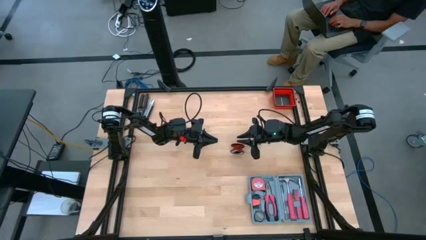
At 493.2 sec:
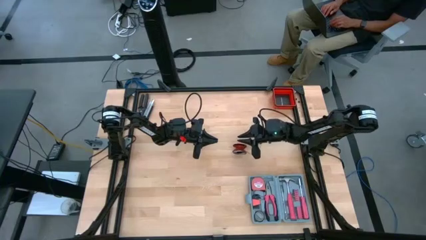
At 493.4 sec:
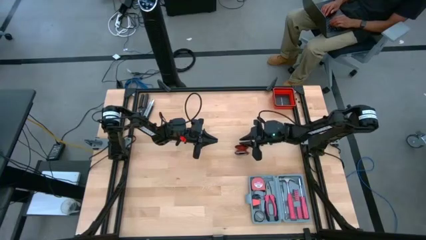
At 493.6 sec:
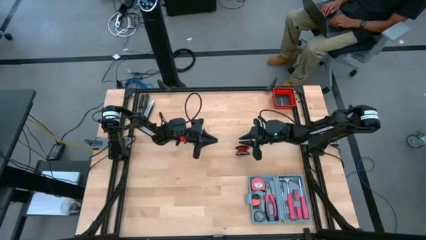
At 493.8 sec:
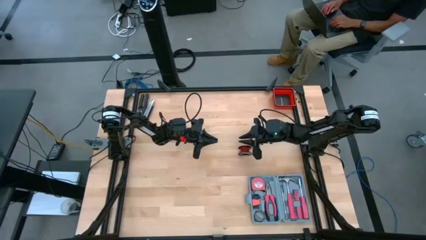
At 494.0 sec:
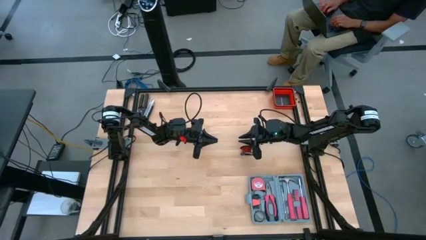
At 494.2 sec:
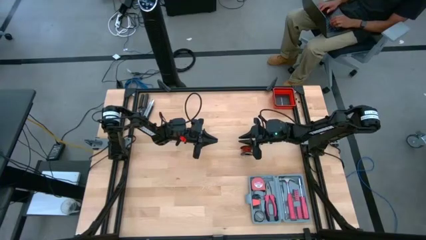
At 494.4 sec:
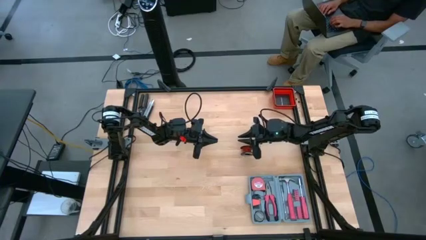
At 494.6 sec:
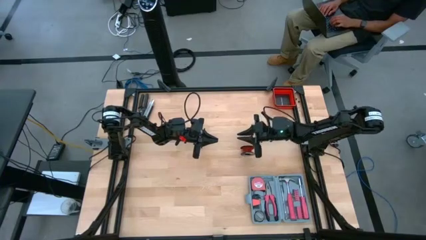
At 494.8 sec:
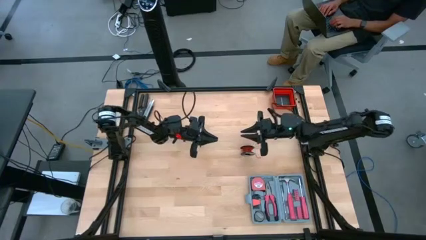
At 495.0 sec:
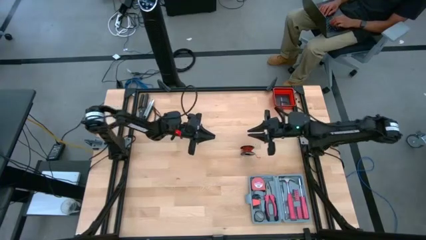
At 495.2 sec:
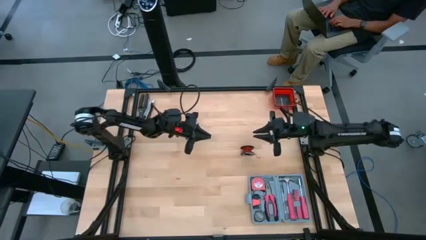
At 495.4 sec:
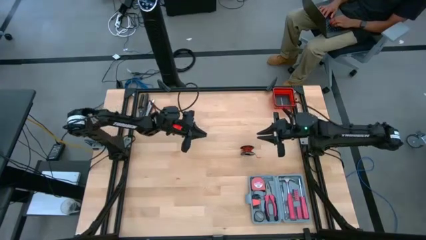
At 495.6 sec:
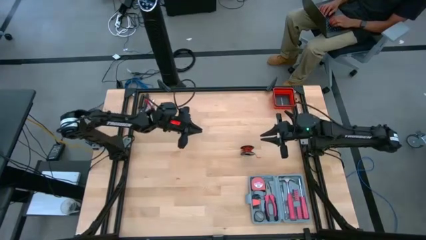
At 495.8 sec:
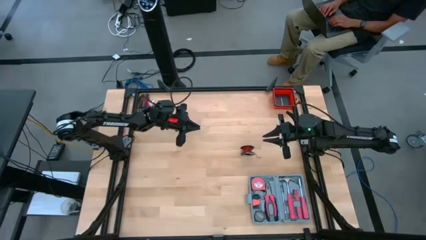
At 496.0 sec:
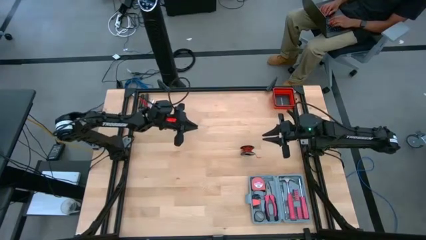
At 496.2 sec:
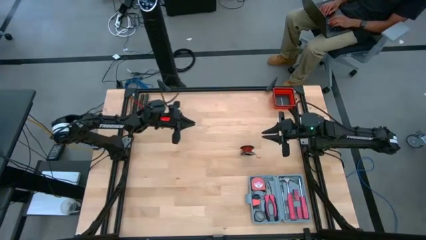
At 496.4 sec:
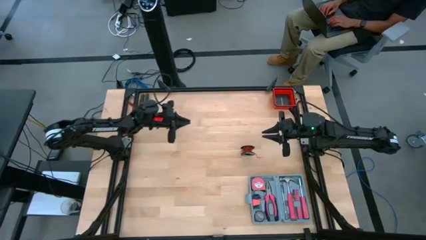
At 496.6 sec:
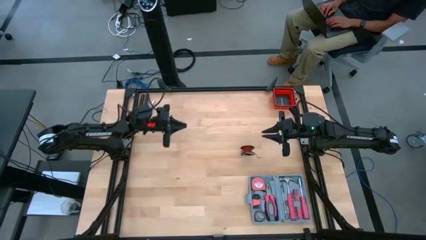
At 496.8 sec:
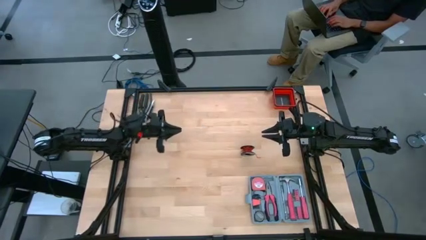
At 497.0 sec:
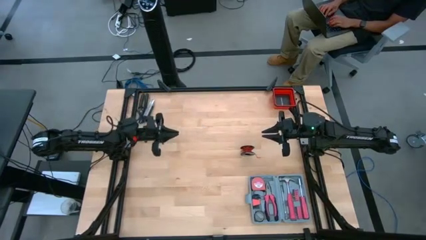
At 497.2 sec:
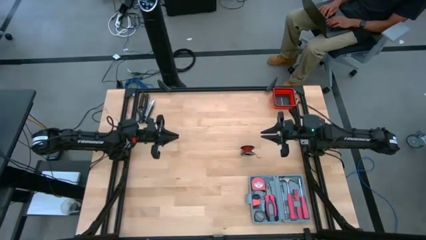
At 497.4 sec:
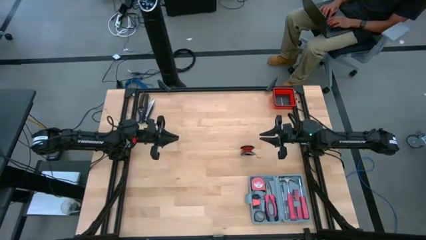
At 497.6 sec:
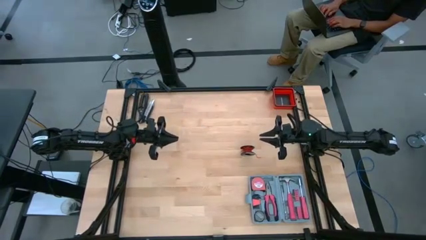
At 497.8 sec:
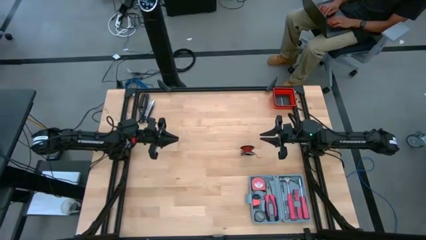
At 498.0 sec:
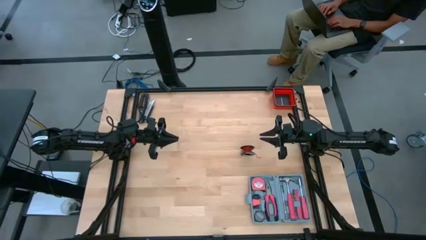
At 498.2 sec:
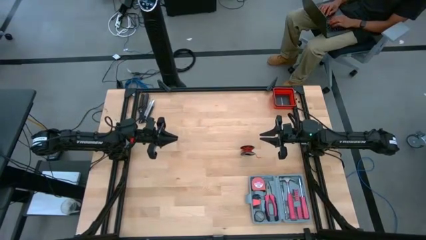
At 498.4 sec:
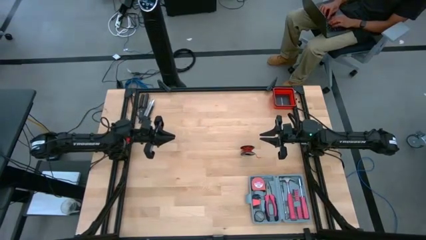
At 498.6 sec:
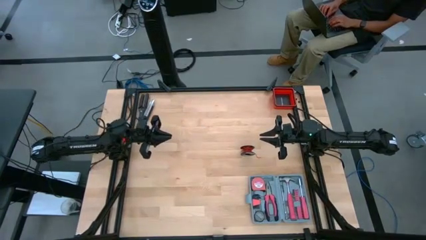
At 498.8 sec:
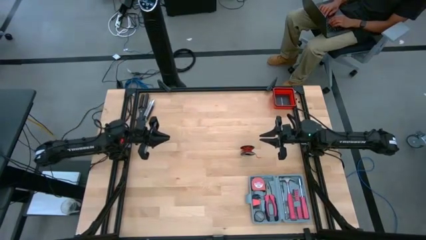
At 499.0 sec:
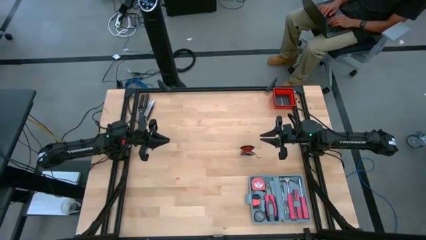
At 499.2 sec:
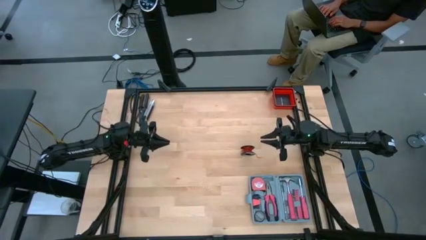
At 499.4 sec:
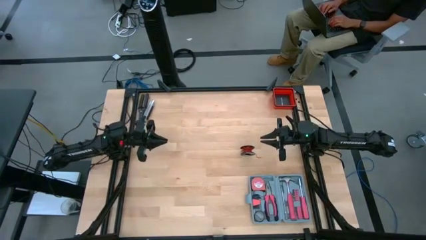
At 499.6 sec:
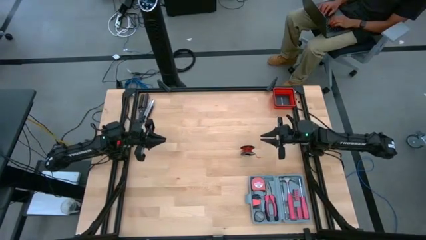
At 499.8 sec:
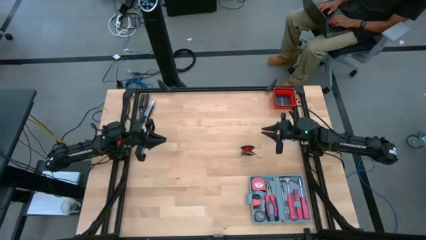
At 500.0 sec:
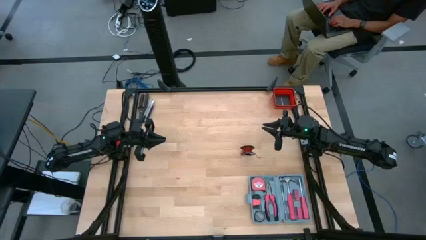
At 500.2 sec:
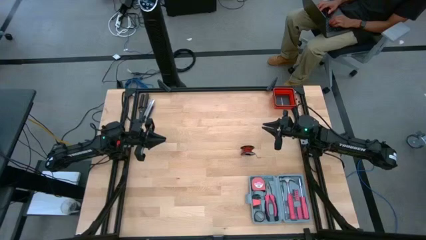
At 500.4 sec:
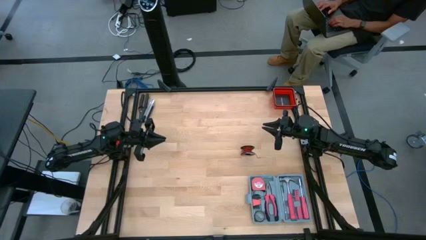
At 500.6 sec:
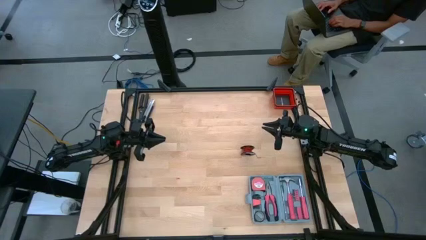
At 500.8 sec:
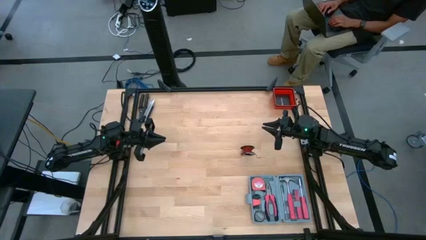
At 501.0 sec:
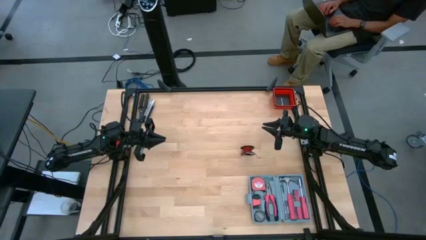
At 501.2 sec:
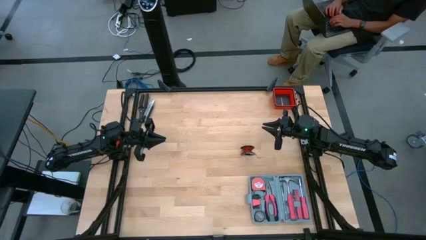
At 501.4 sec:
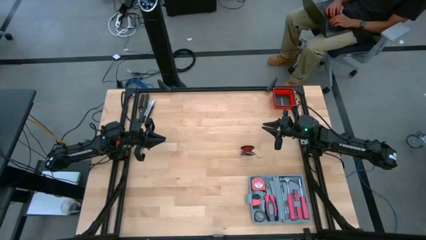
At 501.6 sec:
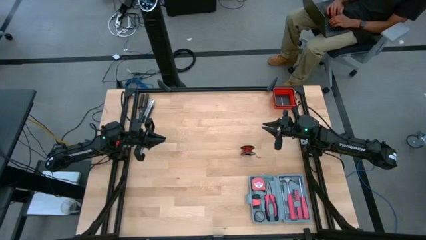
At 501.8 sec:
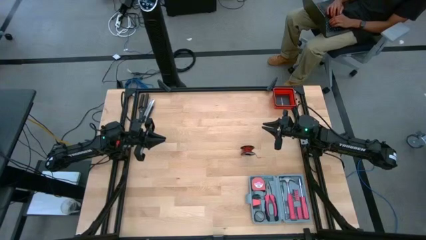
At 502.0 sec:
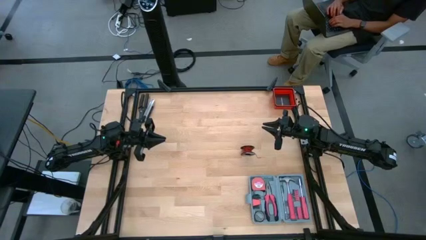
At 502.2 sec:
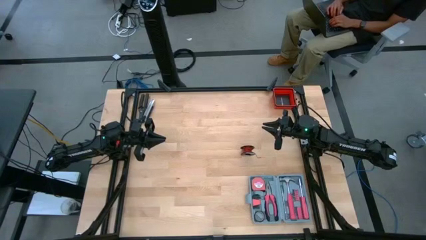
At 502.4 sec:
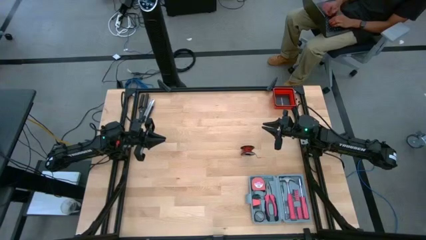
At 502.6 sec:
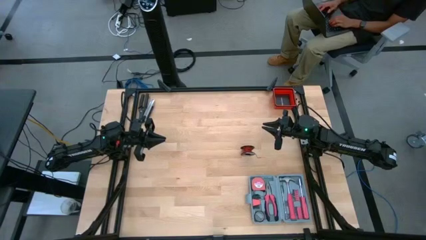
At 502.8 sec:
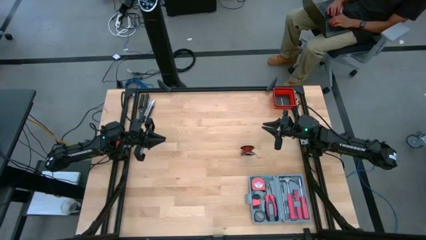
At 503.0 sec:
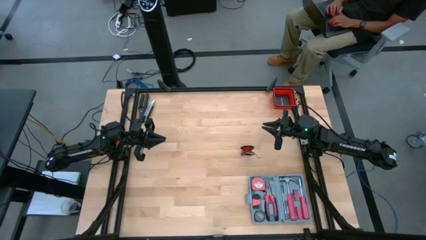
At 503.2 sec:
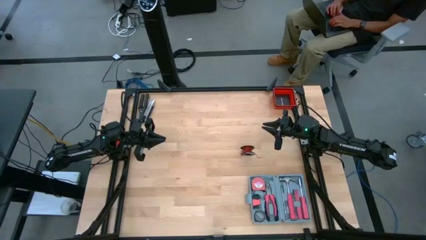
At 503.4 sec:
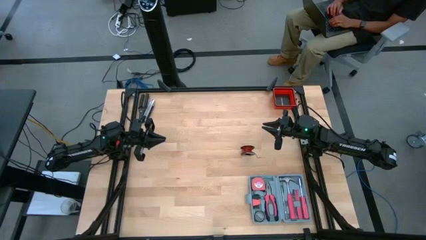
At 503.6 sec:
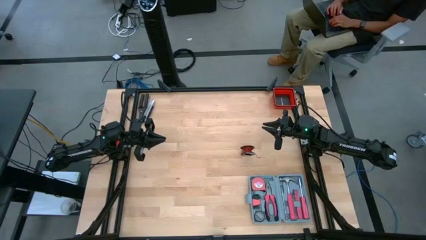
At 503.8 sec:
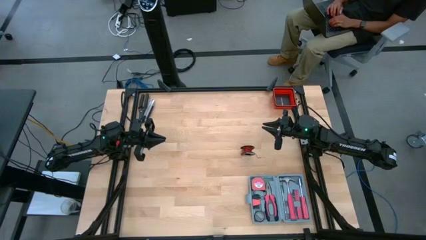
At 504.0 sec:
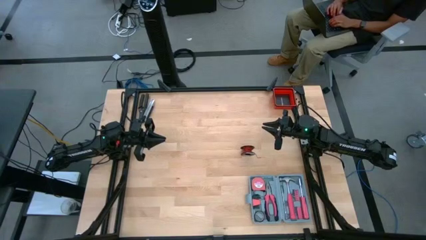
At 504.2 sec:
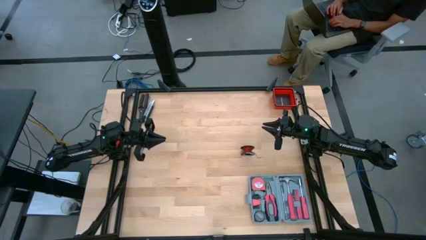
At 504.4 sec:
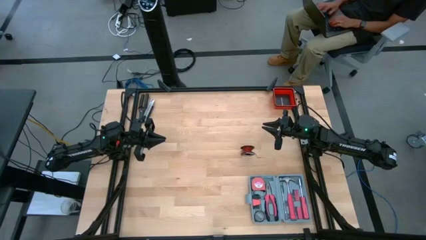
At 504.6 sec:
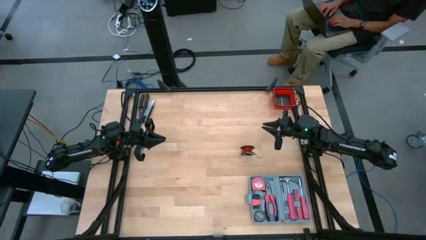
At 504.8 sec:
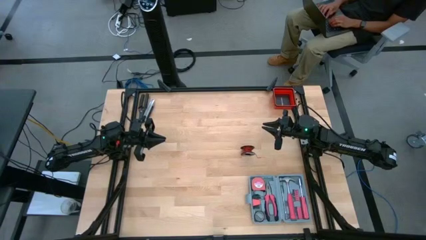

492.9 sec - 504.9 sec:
Task: Coil cords
Return to Home Position

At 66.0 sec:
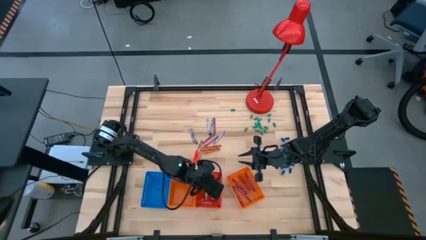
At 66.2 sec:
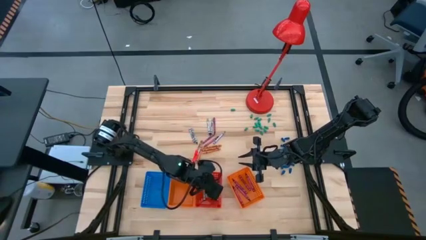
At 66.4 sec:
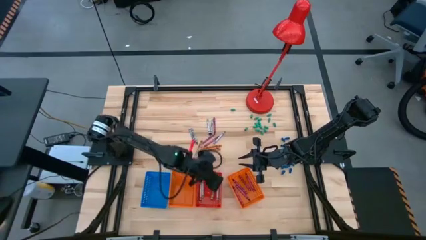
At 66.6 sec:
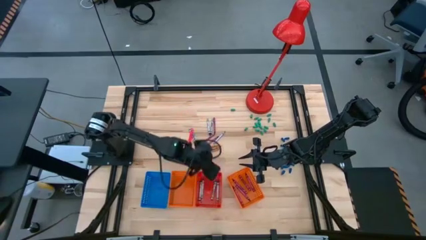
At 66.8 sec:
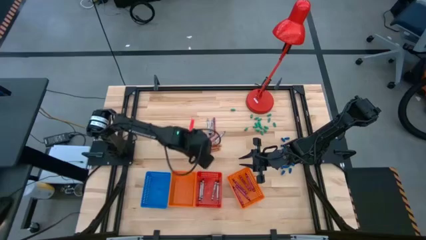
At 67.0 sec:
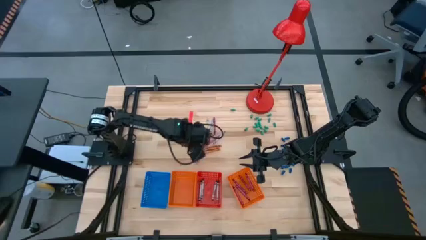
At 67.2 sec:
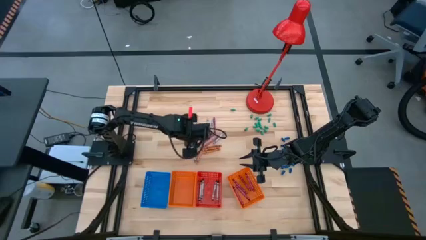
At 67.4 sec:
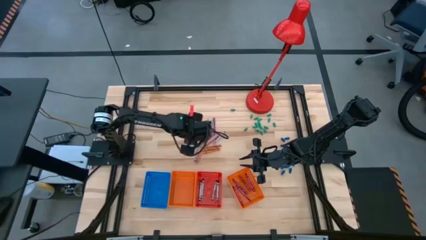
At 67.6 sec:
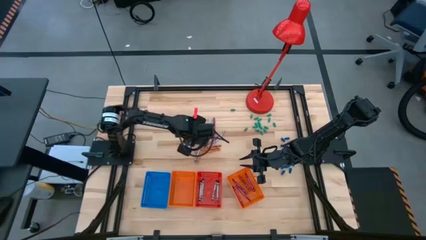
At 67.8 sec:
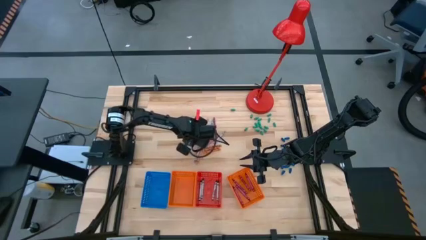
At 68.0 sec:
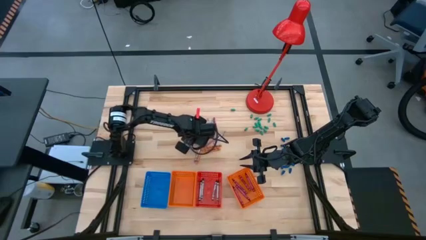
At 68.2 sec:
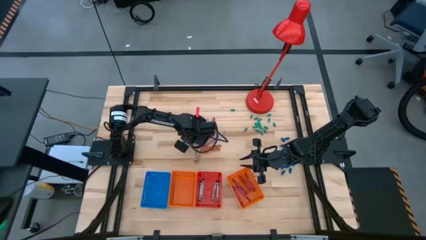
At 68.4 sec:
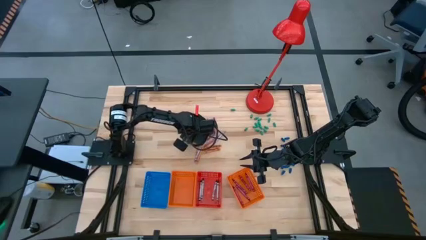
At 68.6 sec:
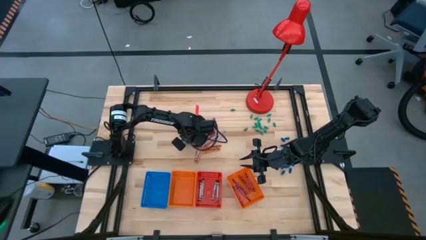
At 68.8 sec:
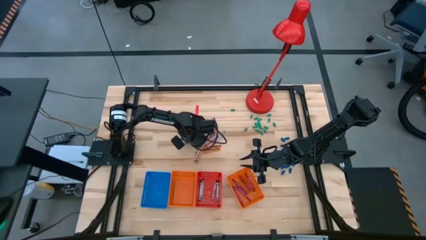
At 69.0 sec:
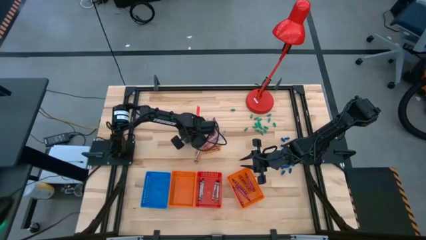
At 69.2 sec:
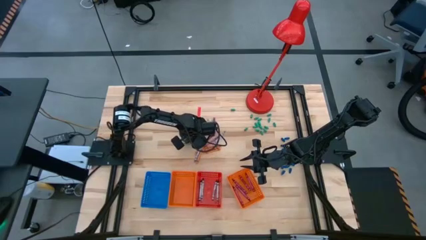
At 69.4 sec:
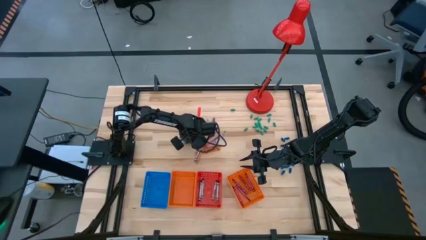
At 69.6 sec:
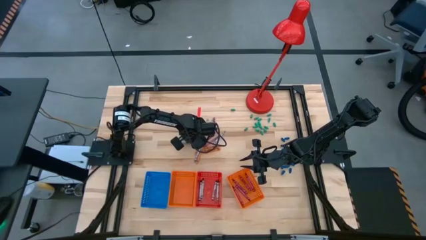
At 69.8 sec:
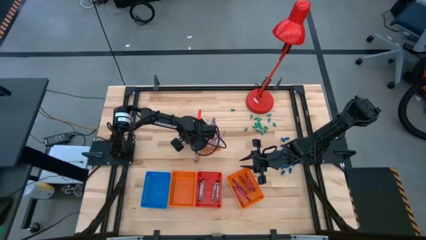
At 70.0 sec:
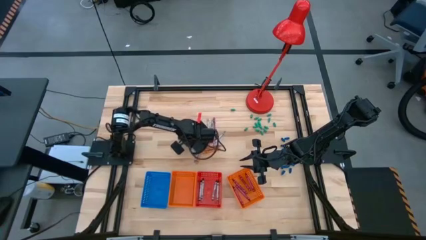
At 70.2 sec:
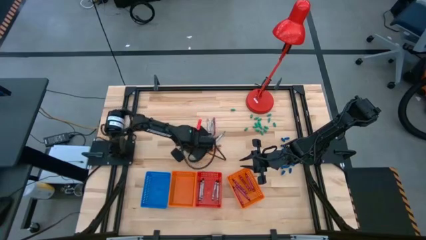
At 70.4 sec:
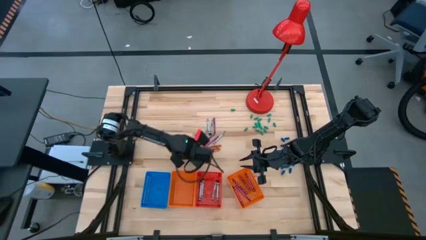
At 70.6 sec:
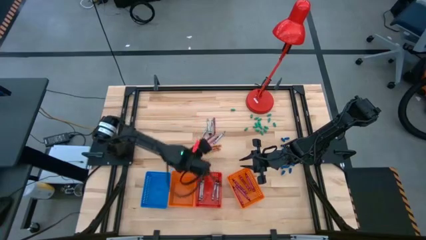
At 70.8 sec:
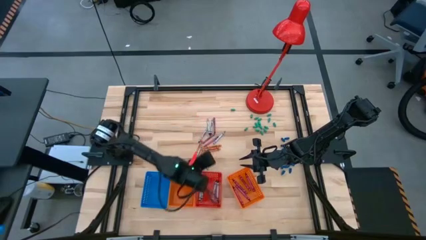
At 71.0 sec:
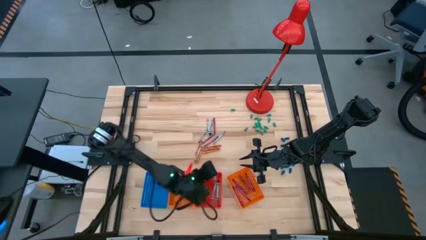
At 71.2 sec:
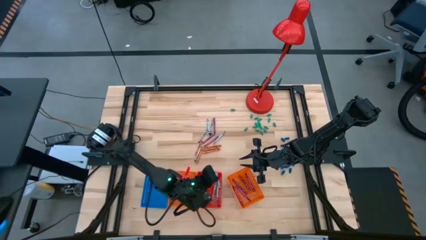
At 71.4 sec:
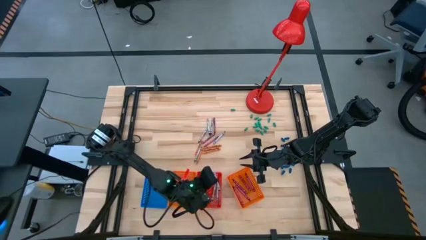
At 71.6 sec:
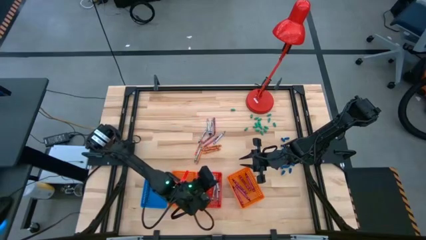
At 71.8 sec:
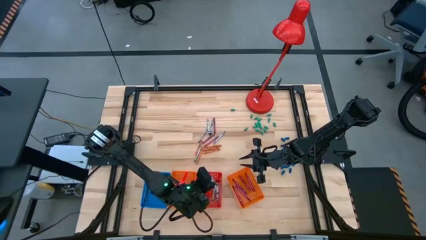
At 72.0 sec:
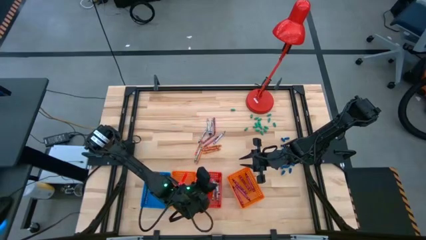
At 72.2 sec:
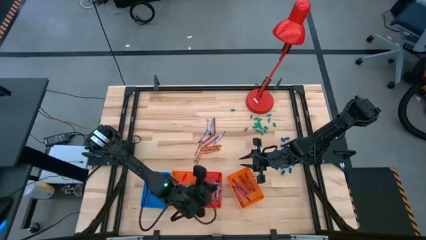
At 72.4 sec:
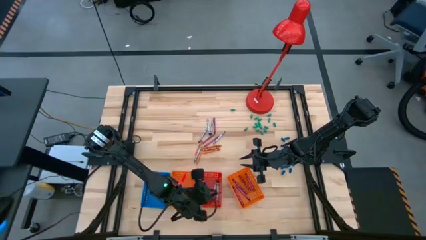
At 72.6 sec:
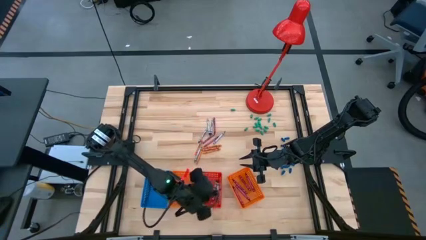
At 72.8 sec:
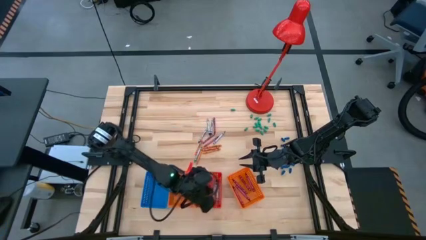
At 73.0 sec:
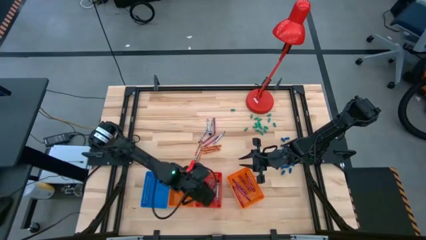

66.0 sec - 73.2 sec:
Task: Sort crayons
Put the black crayon into the red bin
